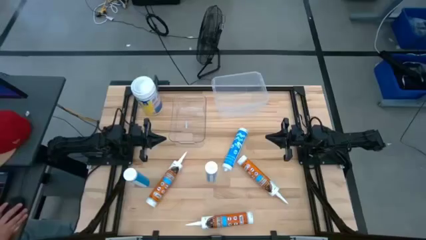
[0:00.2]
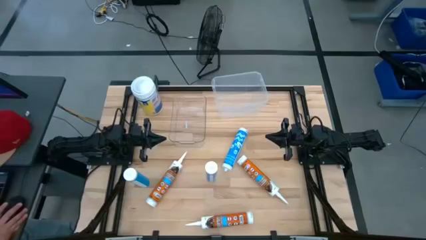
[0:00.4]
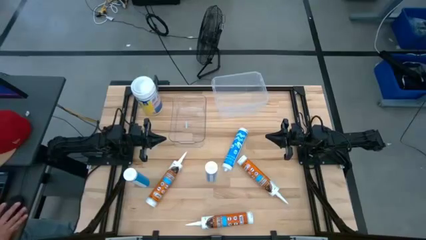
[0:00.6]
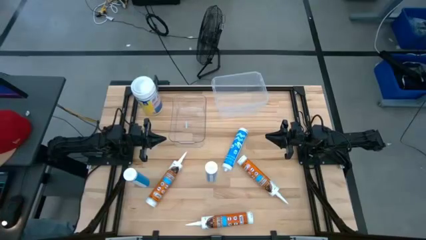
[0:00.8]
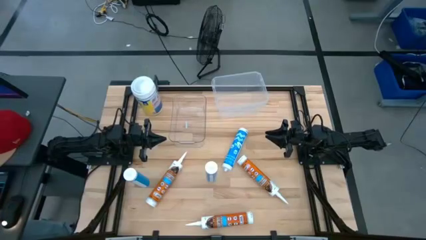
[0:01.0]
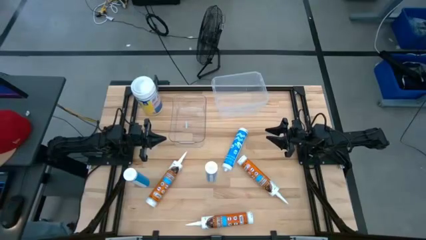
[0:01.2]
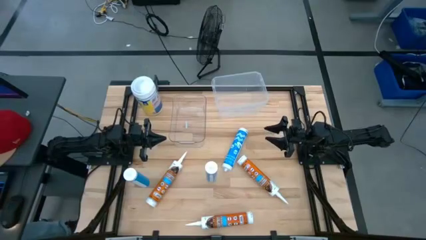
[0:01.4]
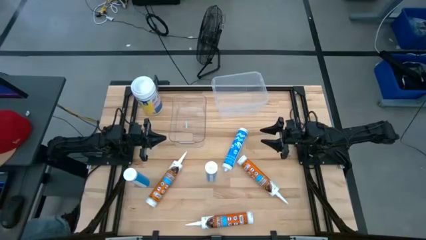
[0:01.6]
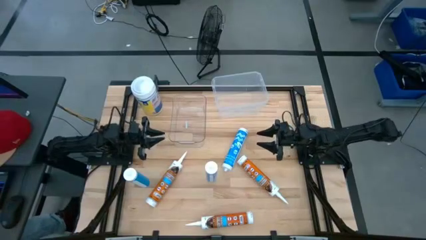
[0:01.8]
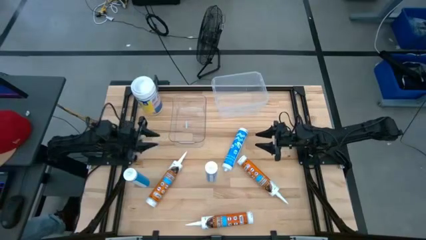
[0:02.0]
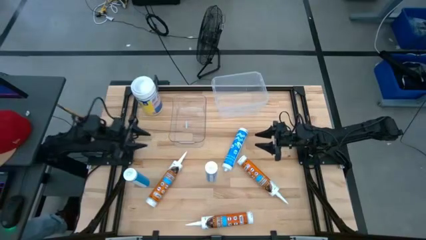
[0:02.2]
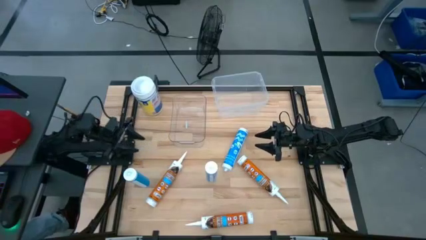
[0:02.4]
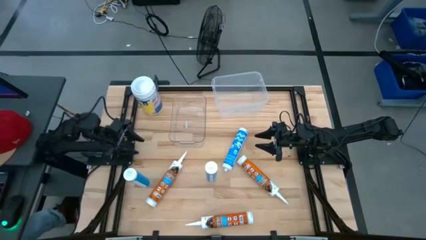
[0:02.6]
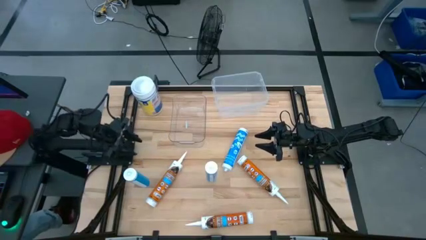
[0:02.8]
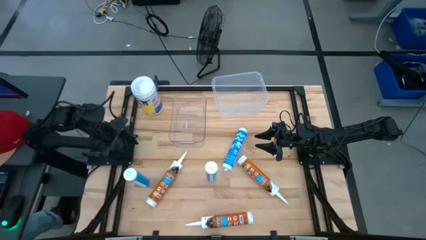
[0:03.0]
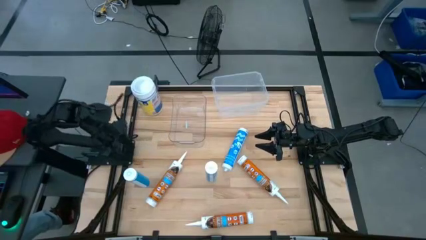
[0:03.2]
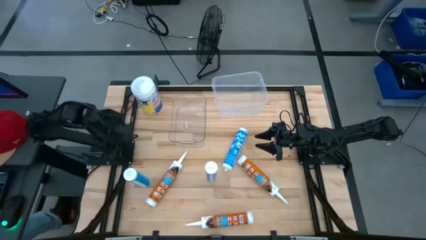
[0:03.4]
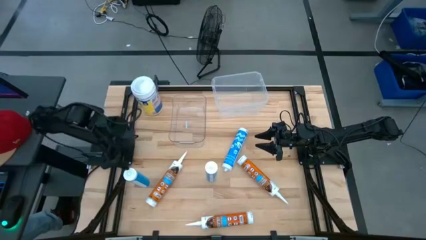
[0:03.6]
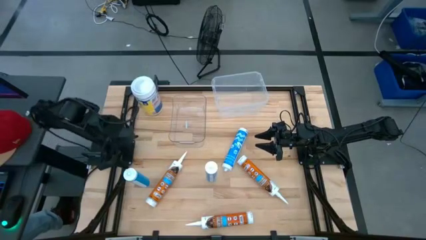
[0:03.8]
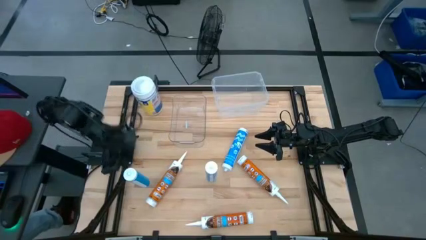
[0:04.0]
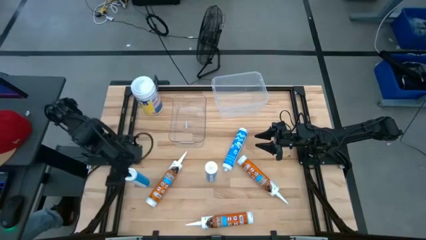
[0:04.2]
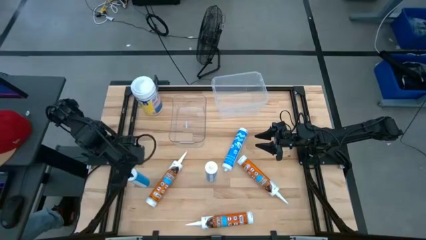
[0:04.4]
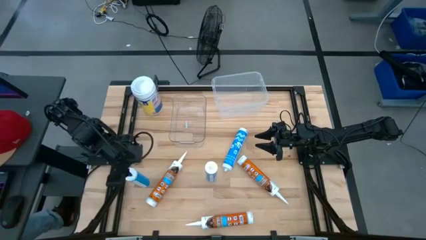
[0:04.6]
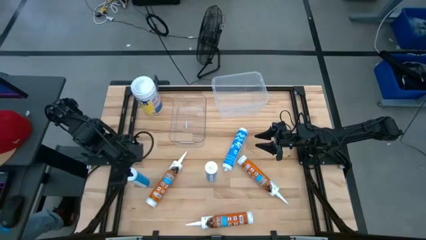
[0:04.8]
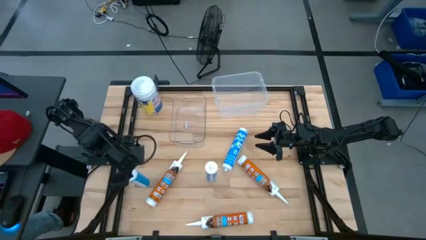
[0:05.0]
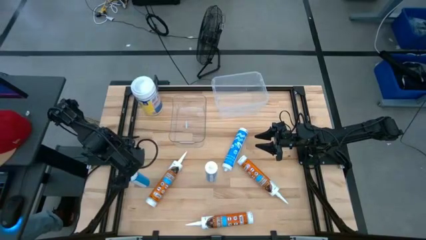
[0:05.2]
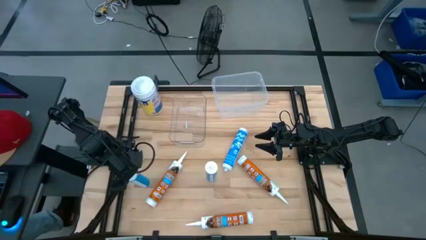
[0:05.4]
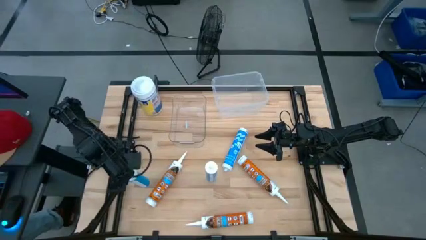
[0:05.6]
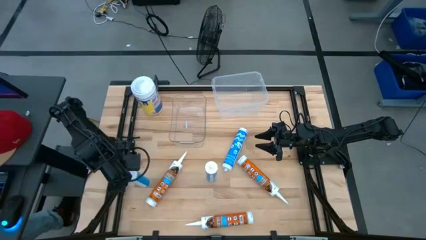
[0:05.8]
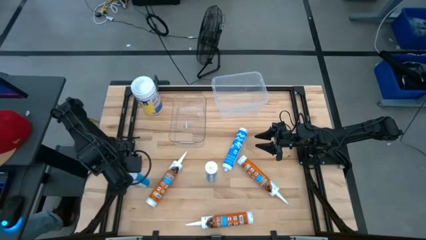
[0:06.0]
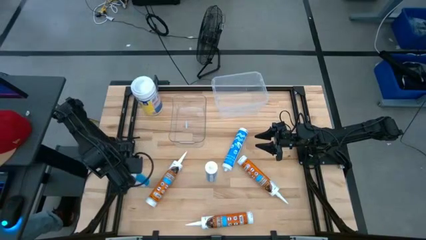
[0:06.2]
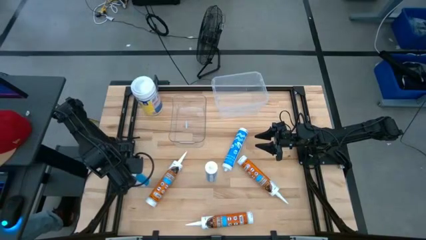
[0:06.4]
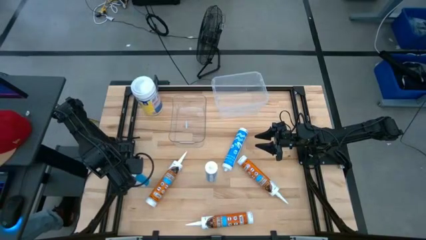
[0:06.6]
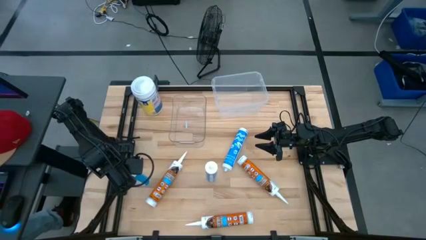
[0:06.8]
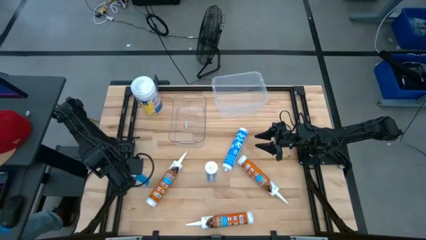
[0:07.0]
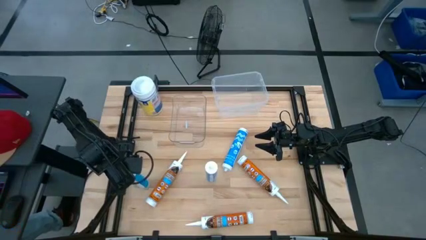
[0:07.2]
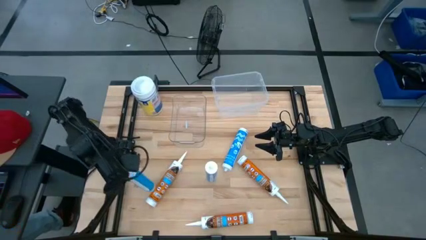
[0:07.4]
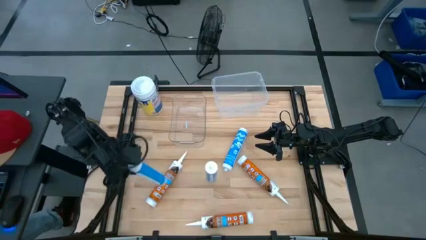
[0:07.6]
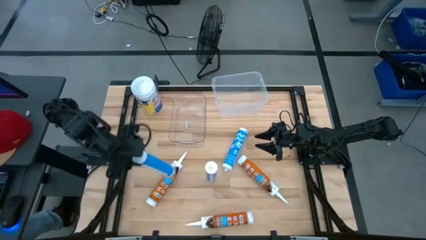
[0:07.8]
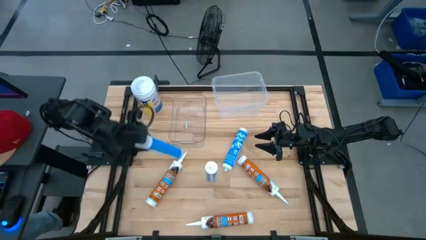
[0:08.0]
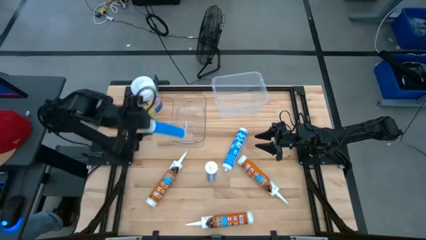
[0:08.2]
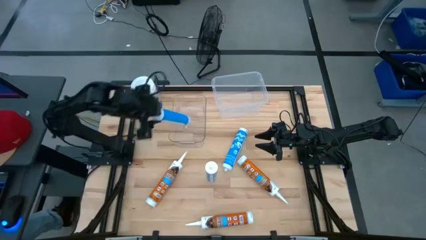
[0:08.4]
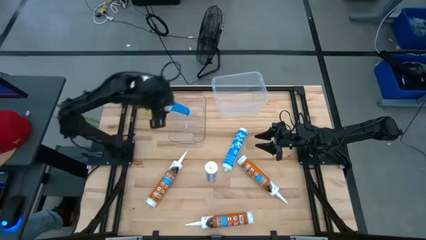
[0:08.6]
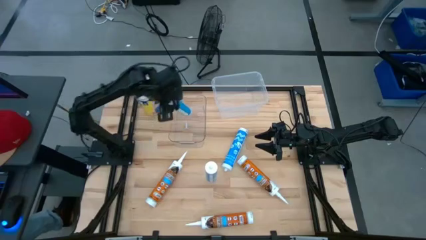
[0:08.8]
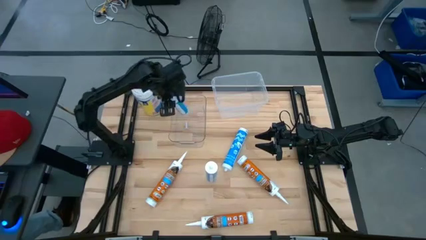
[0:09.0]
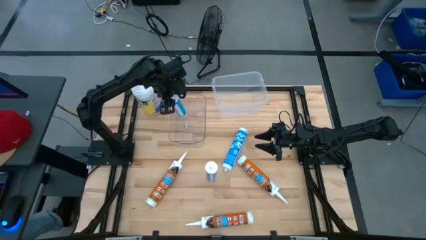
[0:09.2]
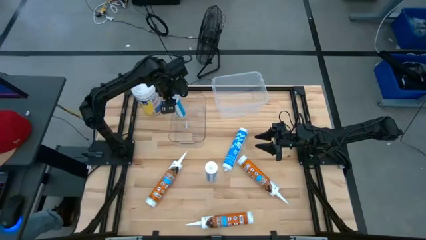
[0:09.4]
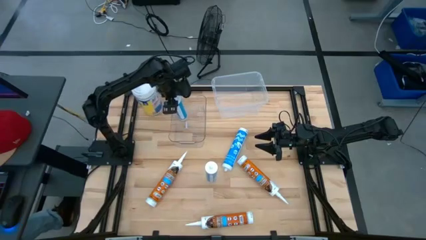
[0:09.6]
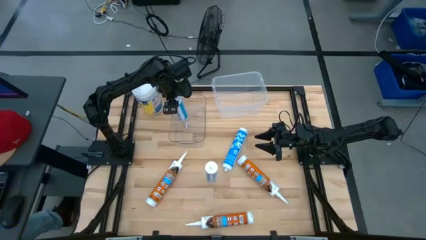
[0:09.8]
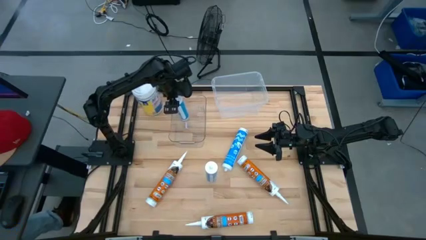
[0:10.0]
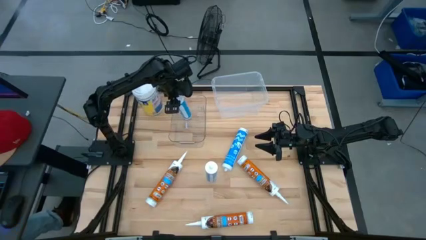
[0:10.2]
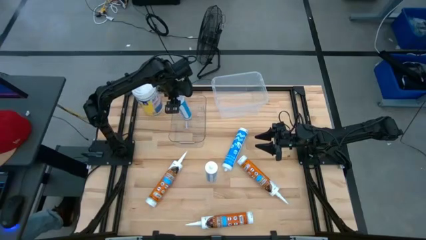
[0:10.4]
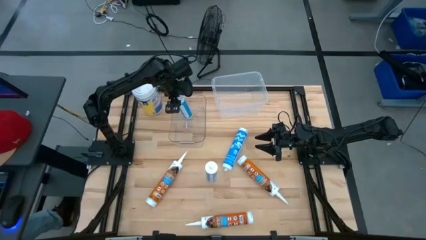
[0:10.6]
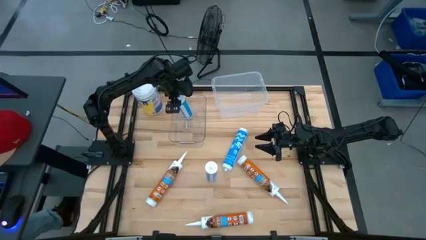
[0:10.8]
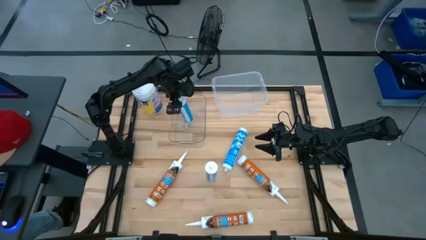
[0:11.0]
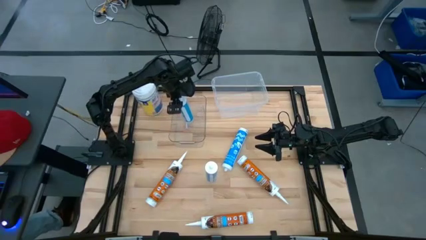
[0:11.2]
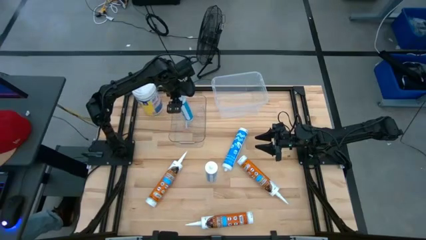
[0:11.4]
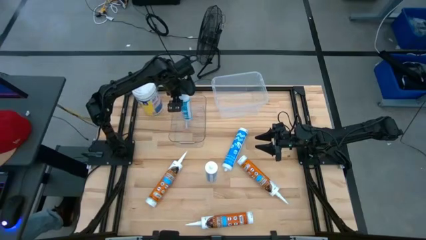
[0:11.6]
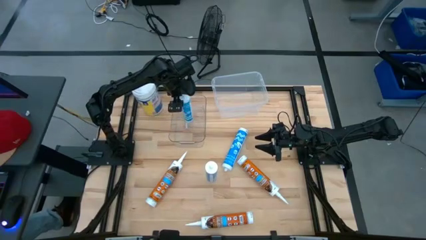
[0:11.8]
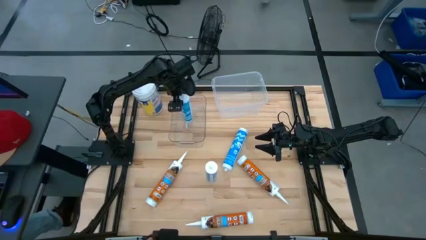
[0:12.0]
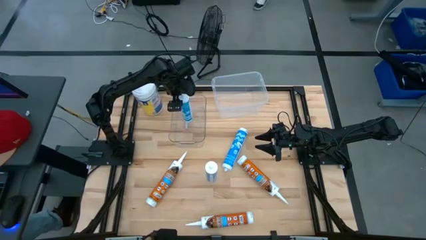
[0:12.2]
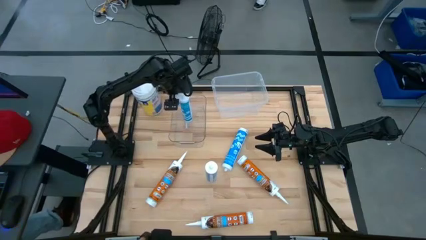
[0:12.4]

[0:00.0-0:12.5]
Task: Pick & place silicon tubes, Sealant and Lysol wipes
Put the bottom left blue sealant into the transparent bin
